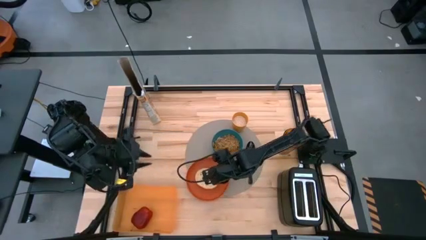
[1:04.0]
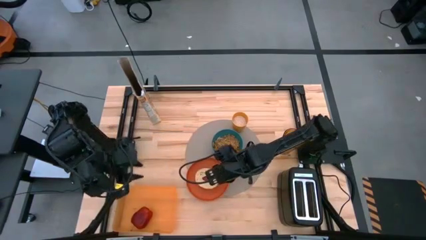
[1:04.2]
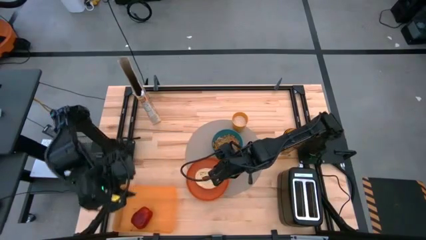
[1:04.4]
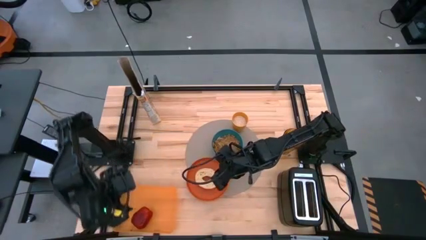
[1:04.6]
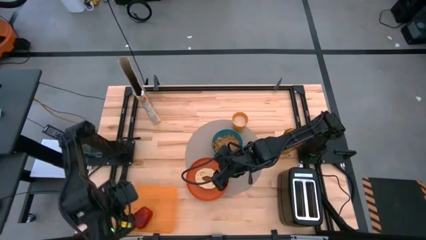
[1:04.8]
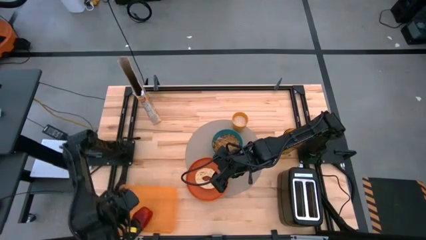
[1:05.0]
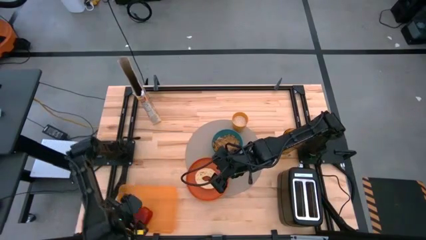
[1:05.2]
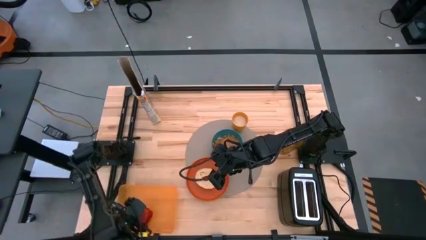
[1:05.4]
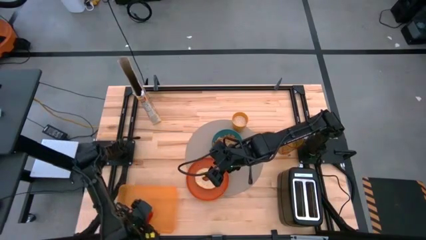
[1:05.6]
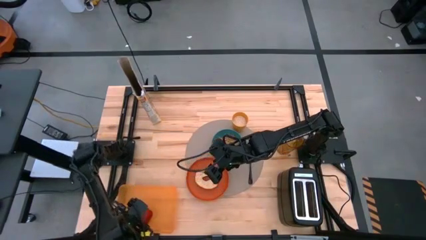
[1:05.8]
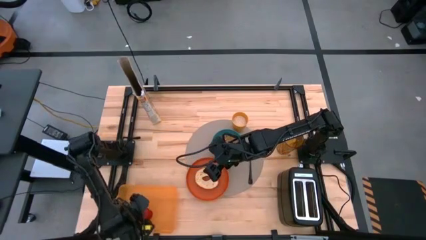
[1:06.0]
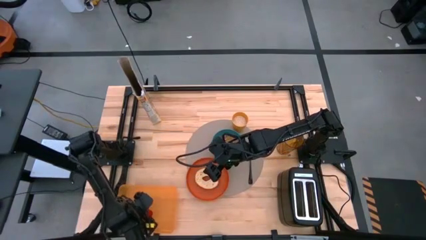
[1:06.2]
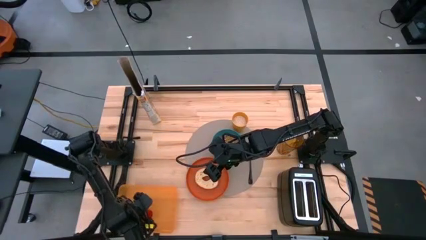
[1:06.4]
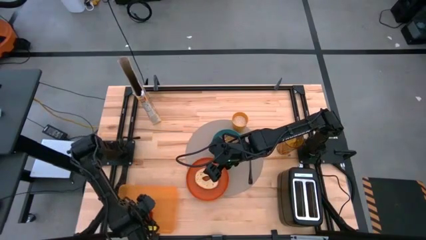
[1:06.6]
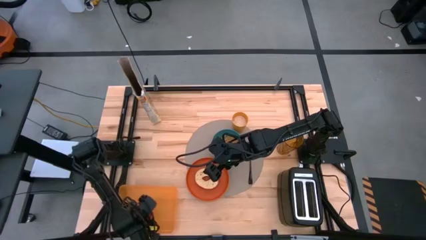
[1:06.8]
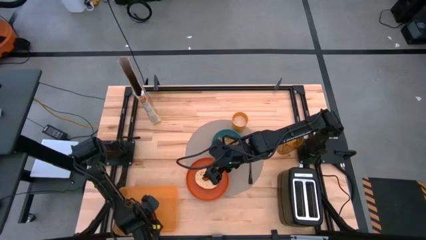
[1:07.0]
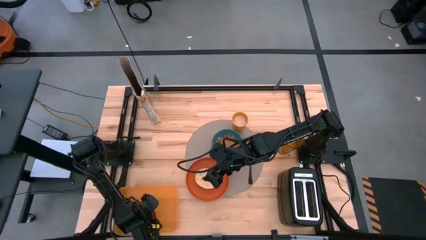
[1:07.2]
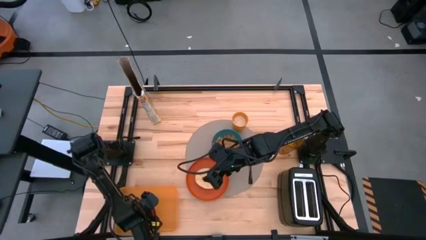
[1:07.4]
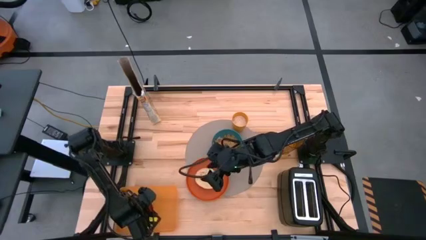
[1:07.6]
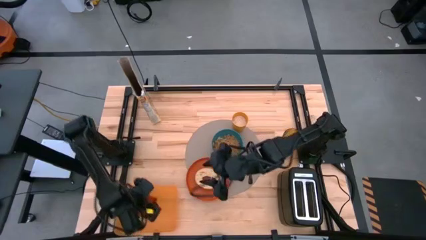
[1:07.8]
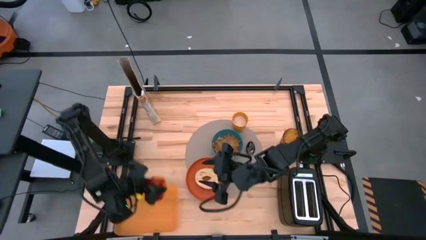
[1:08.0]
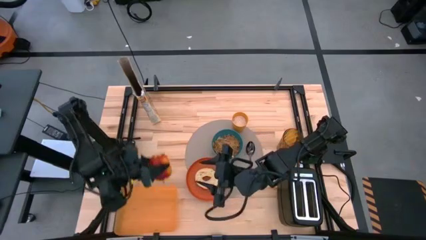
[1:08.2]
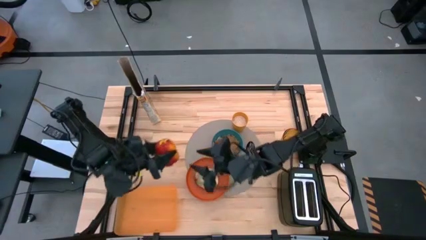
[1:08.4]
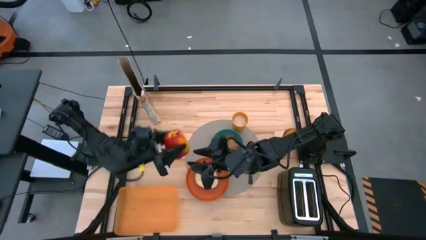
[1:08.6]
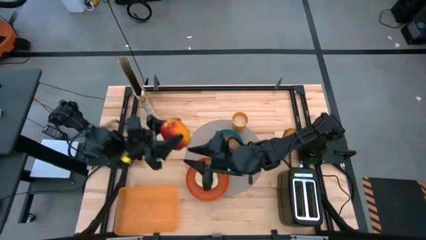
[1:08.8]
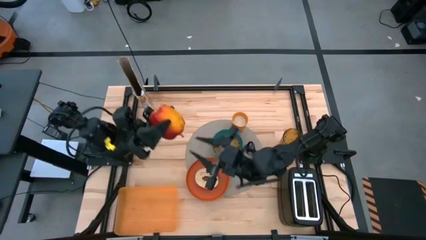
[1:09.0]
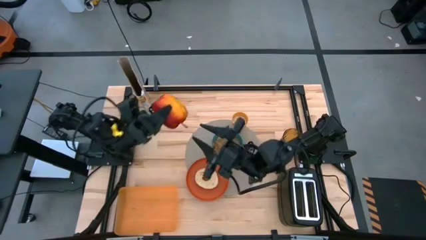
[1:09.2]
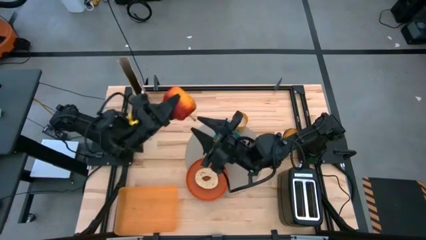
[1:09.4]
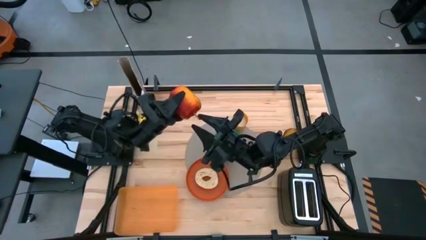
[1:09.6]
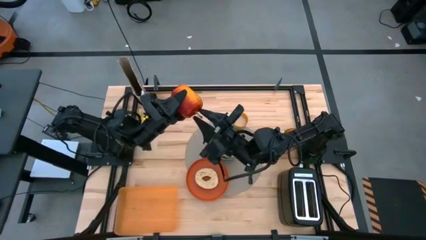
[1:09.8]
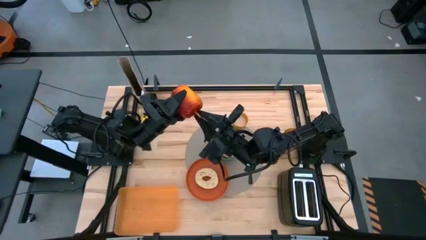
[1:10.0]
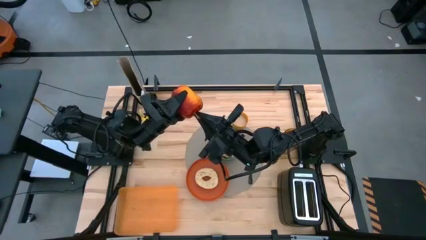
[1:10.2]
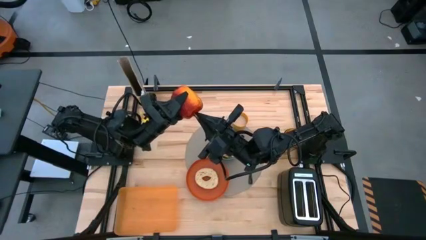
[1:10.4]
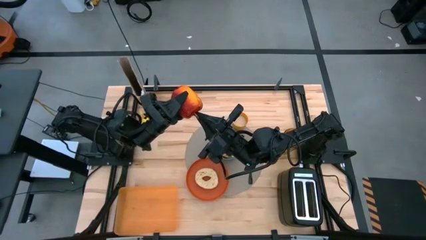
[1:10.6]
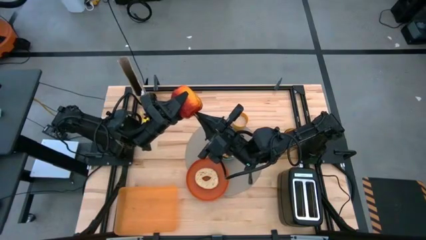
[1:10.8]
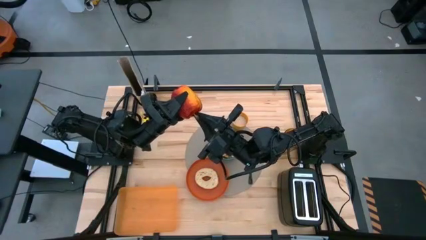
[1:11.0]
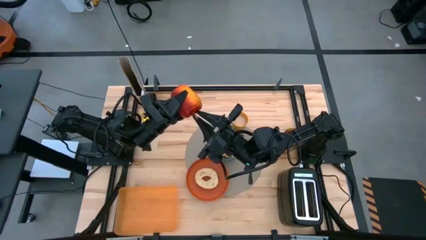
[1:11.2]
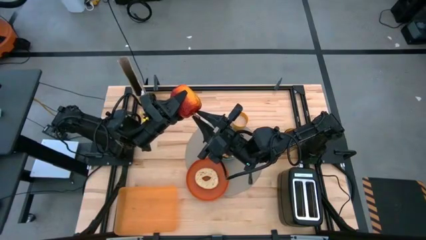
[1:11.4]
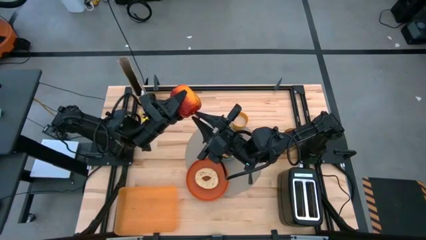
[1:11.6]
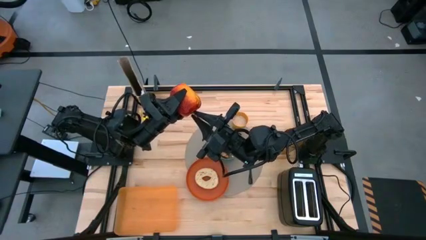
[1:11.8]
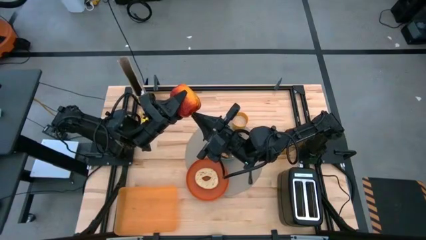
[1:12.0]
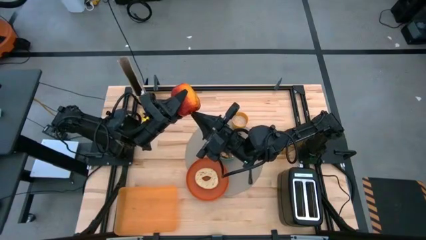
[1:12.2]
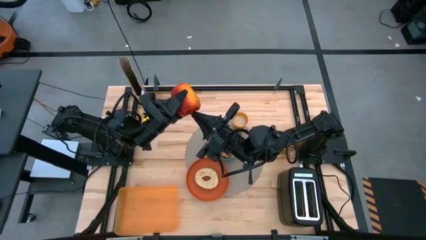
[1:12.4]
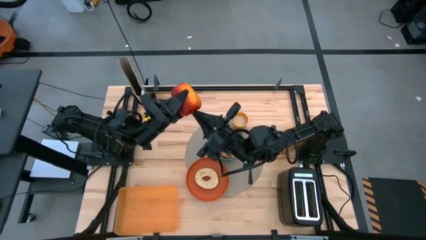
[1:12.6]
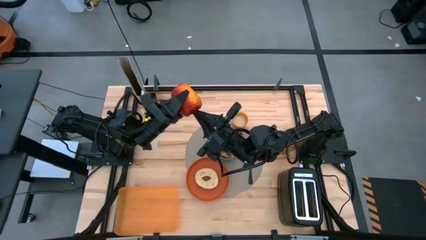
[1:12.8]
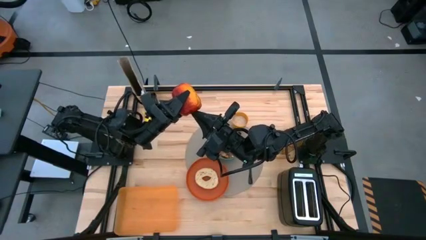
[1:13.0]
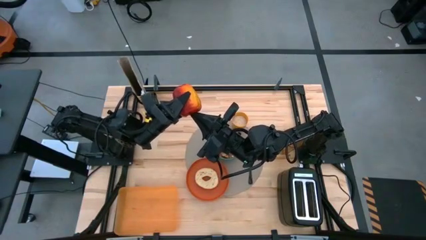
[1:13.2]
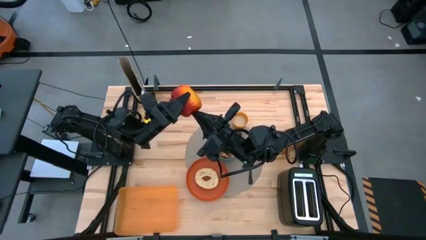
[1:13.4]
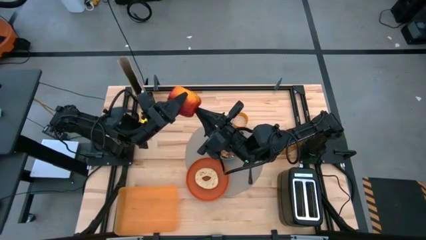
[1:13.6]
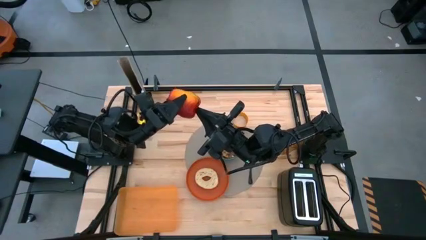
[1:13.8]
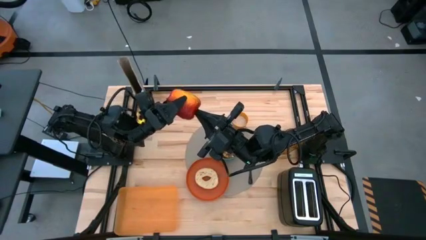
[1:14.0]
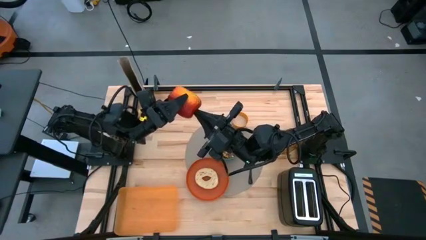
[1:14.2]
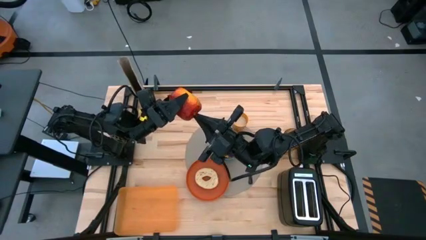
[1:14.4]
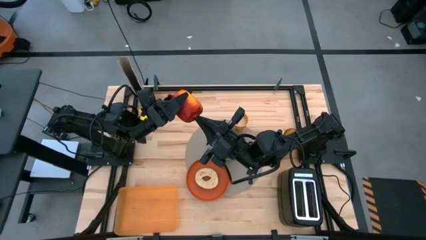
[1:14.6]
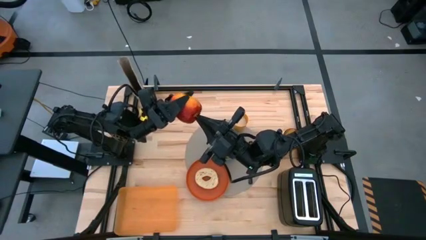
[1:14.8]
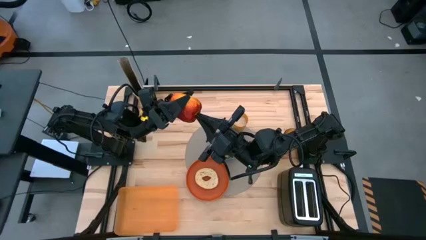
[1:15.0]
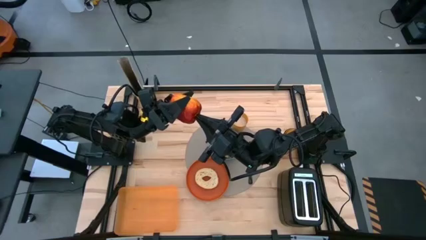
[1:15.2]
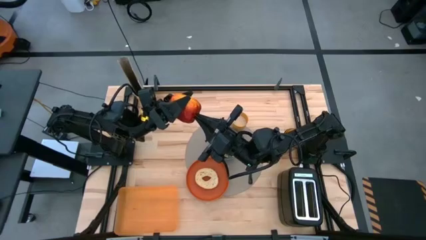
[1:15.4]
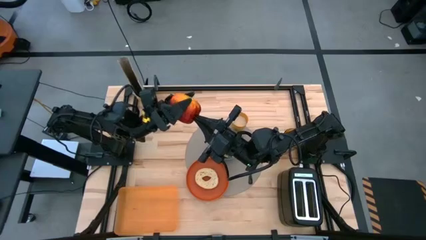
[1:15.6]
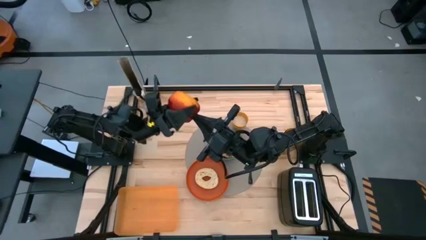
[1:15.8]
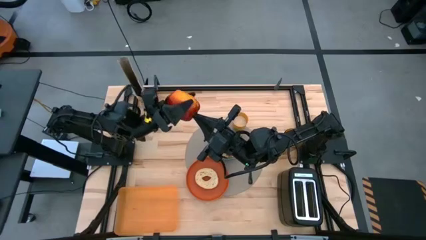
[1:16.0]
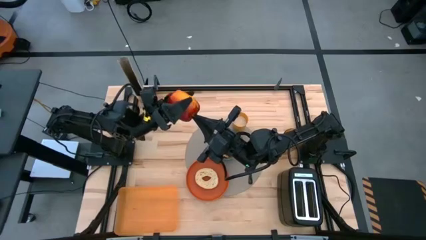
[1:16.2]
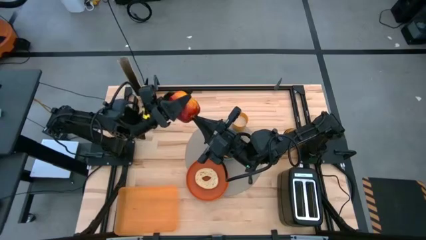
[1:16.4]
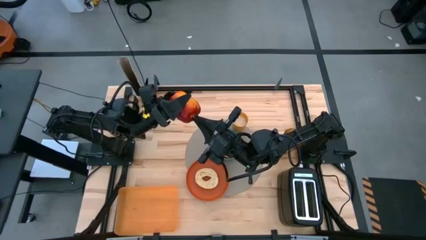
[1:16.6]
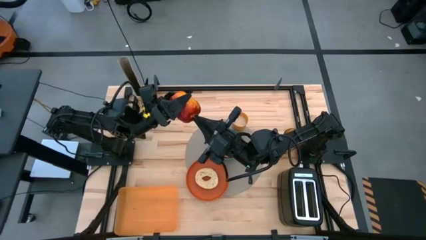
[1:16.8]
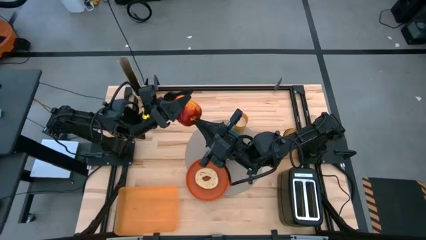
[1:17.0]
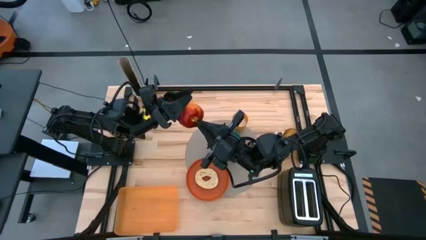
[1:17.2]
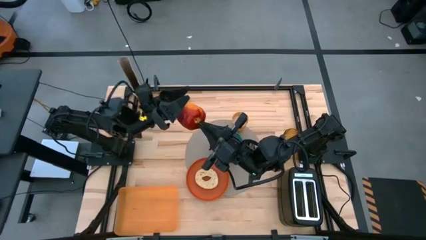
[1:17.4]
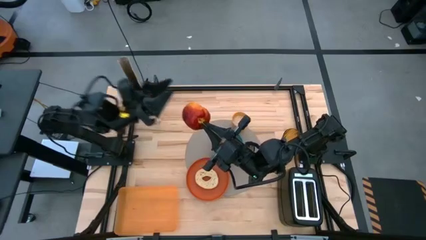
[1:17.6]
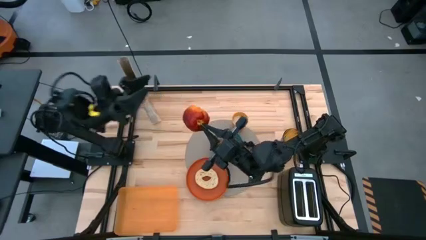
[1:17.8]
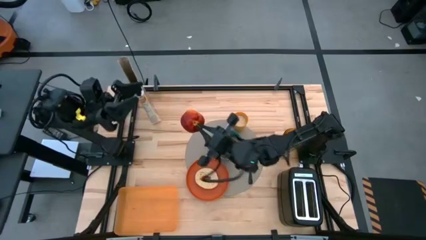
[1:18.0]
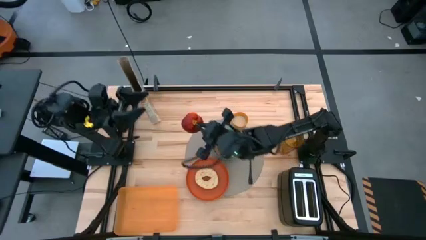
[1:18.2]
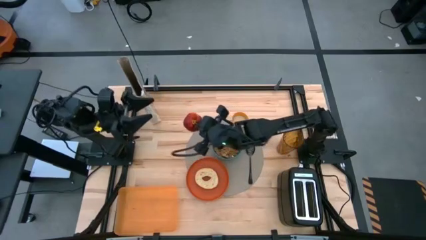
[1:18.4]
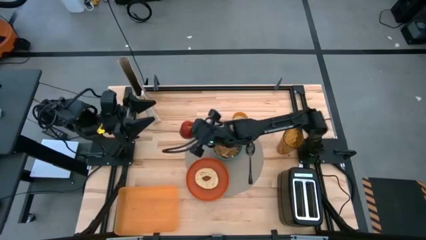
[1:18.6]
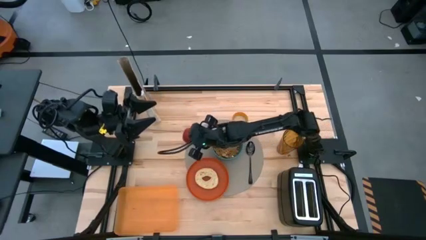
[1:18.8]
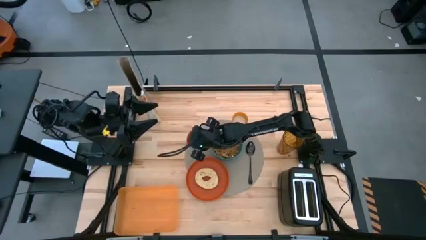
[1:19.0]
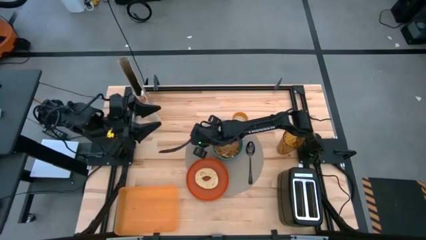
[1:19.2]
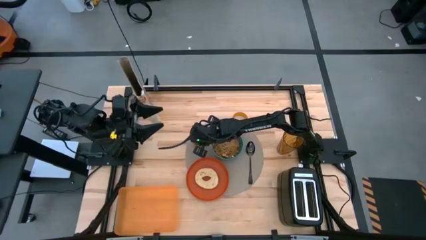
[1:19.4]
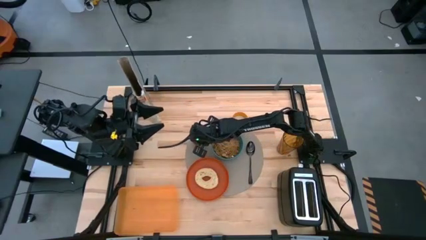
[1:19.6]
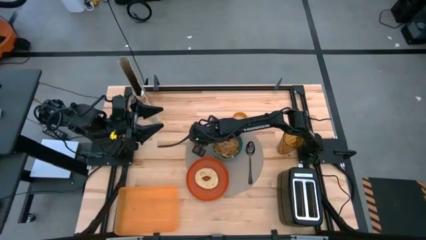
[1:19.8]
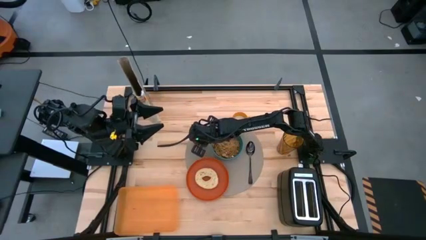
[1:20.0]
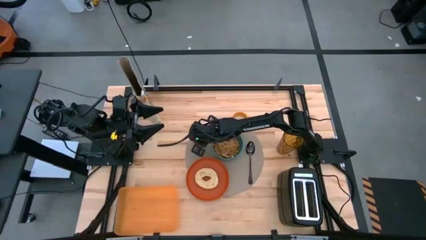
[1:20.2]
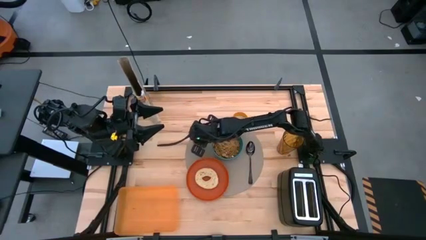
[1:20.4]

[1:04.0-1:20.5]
Task: Arrange a breakfast setting
Put the apple on the gray mat to the top left of the green bowl
